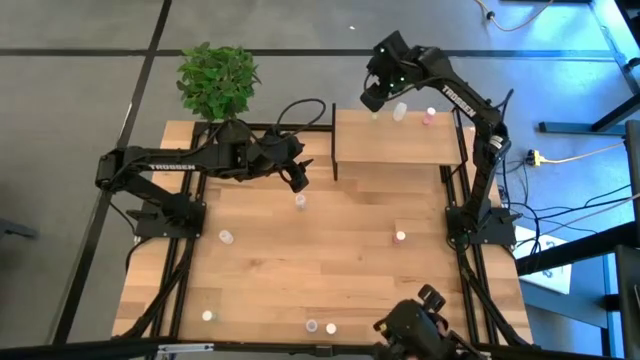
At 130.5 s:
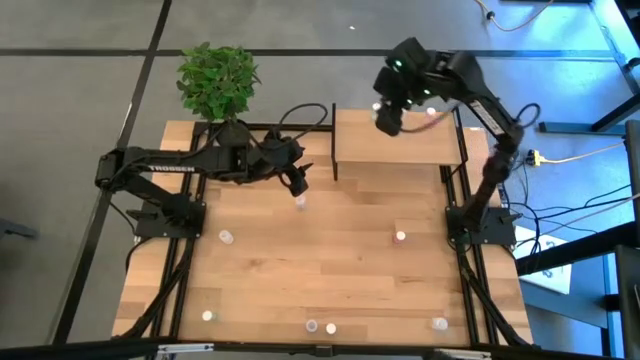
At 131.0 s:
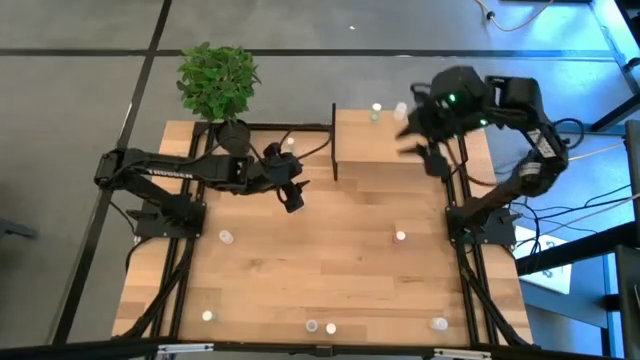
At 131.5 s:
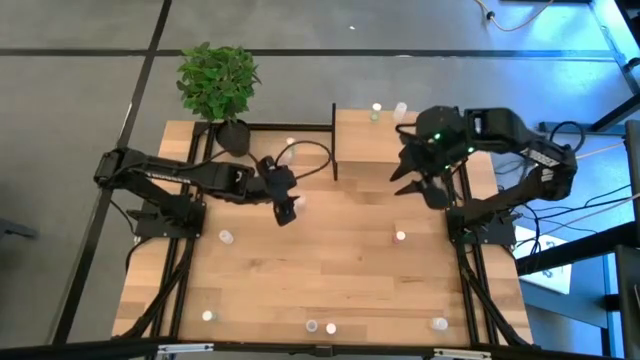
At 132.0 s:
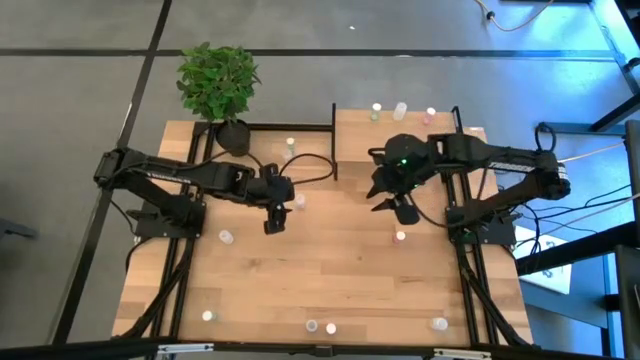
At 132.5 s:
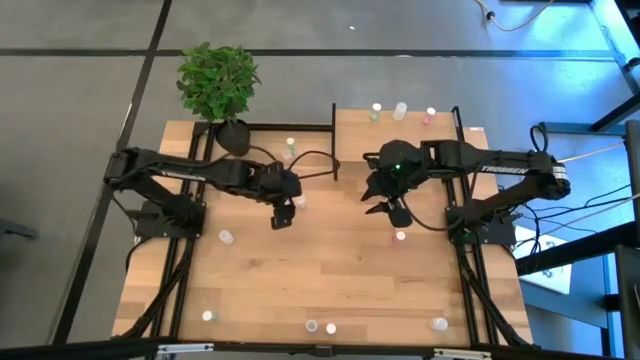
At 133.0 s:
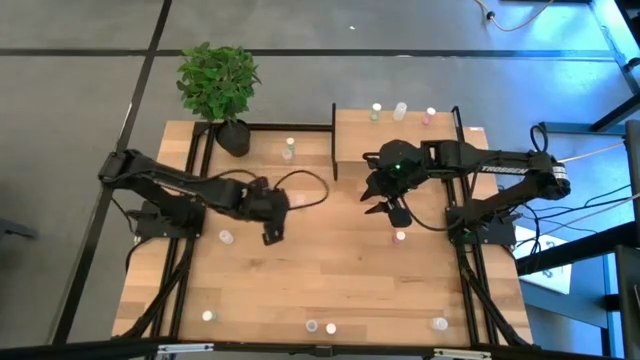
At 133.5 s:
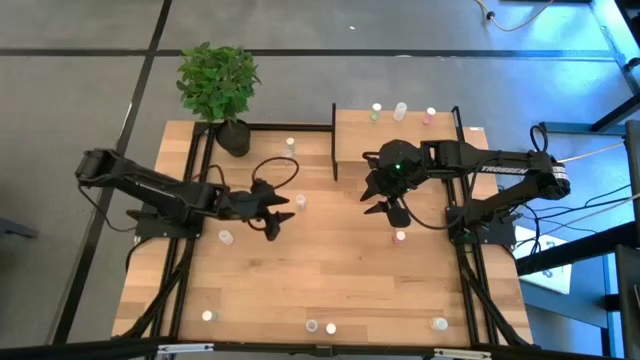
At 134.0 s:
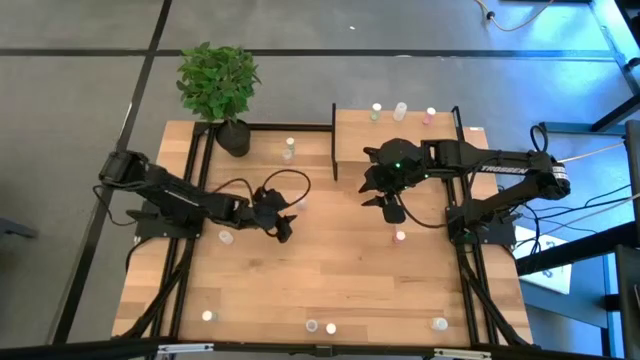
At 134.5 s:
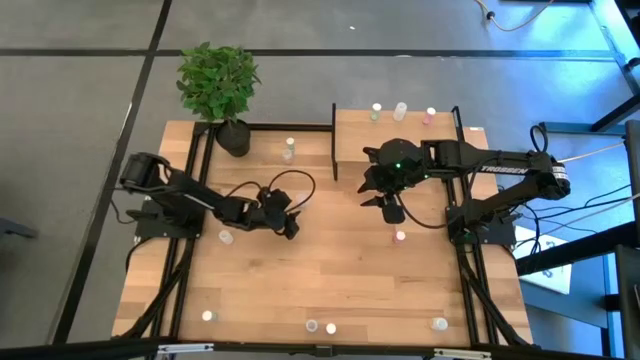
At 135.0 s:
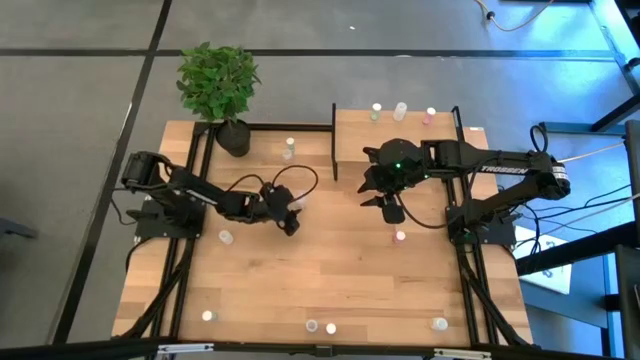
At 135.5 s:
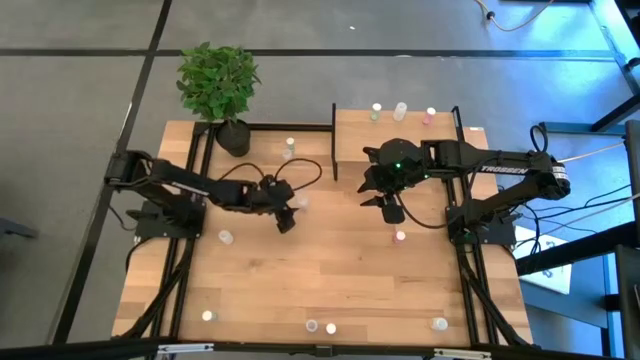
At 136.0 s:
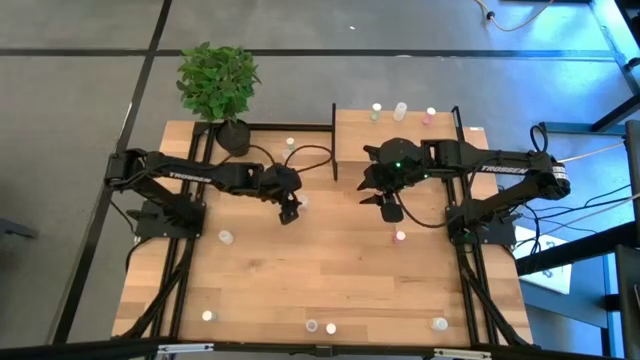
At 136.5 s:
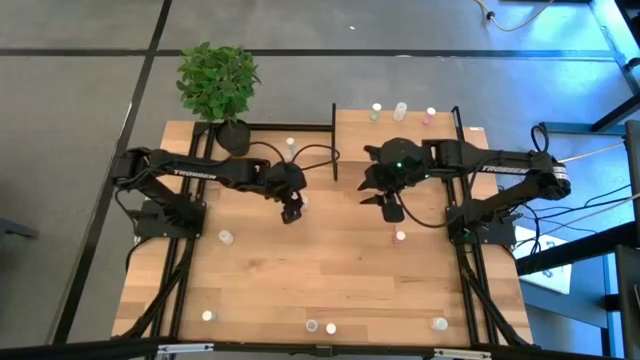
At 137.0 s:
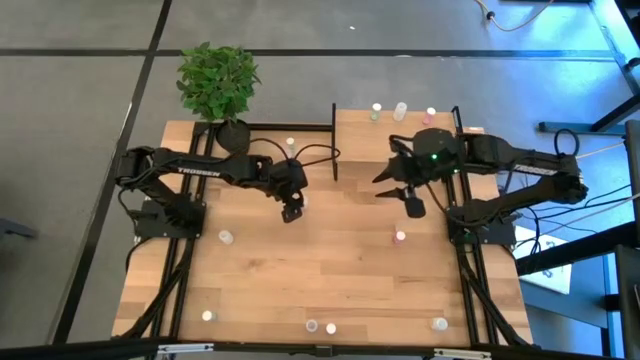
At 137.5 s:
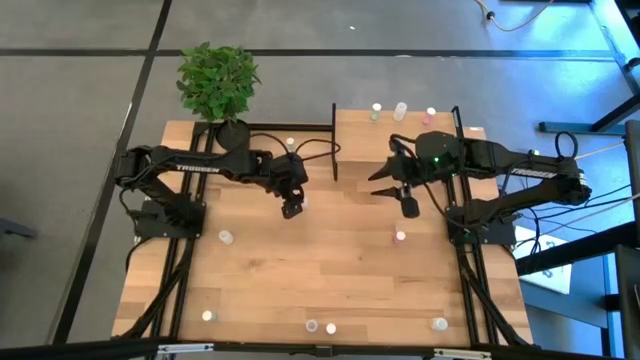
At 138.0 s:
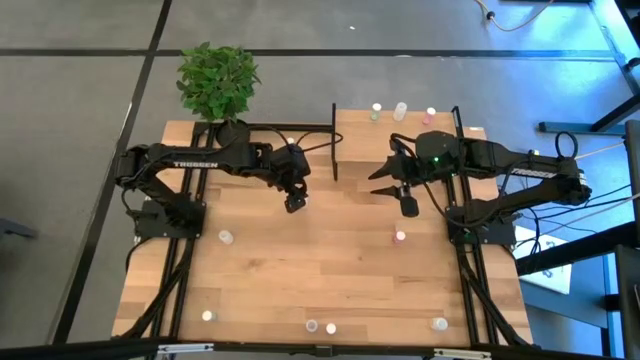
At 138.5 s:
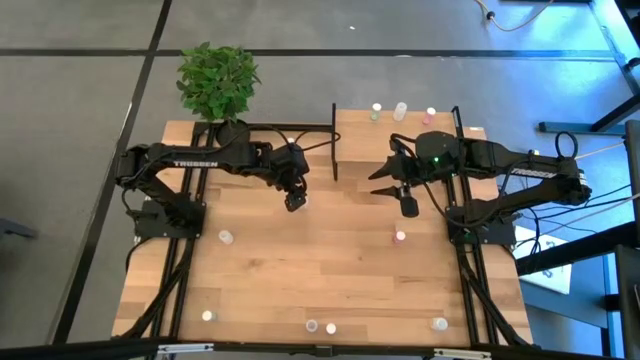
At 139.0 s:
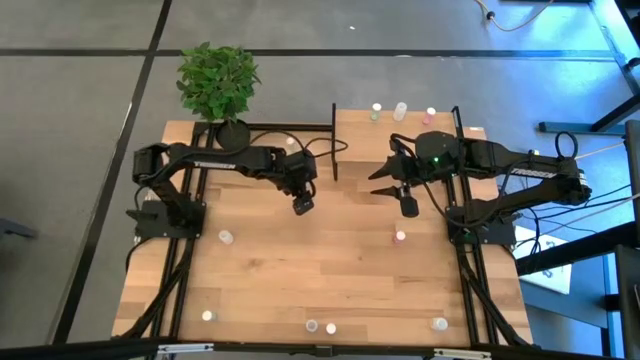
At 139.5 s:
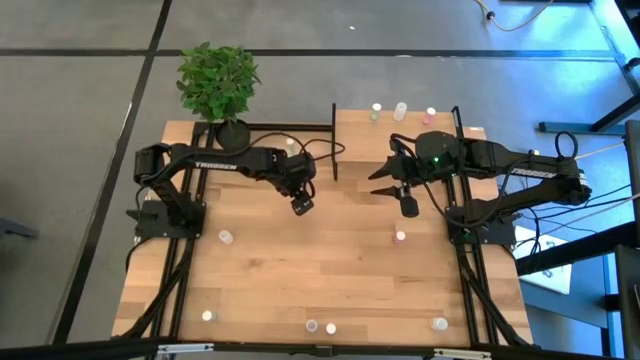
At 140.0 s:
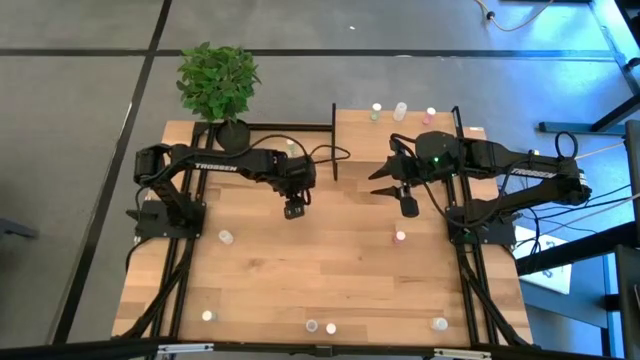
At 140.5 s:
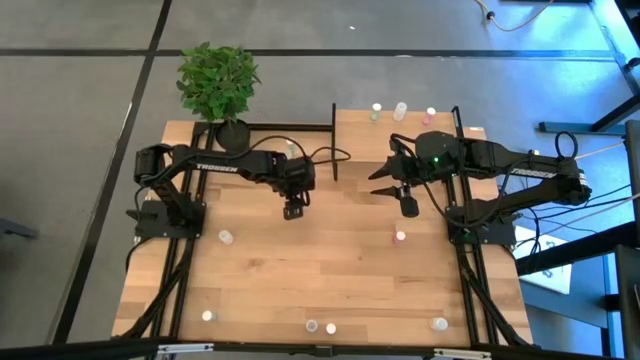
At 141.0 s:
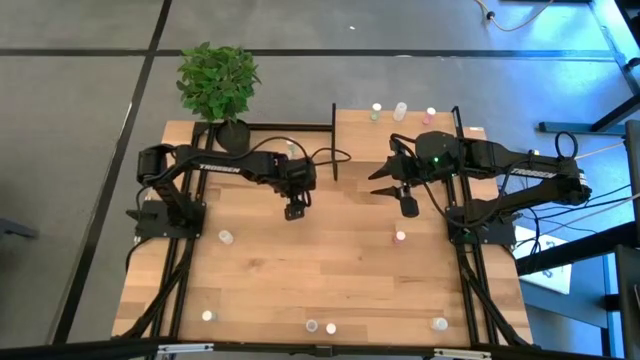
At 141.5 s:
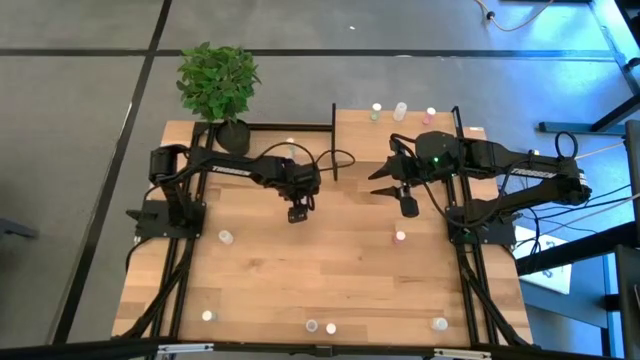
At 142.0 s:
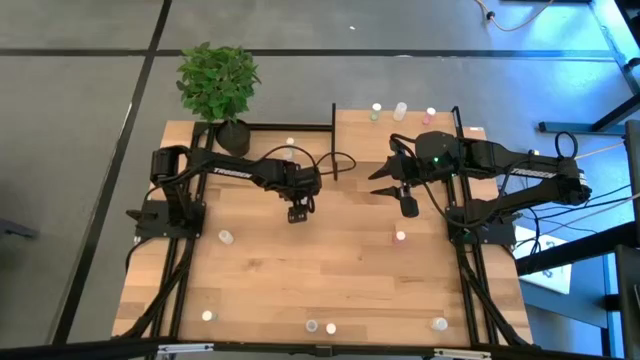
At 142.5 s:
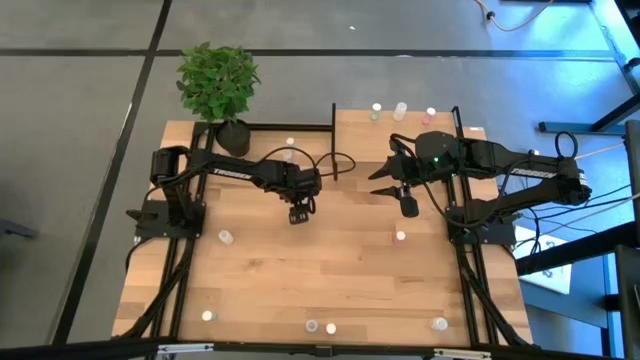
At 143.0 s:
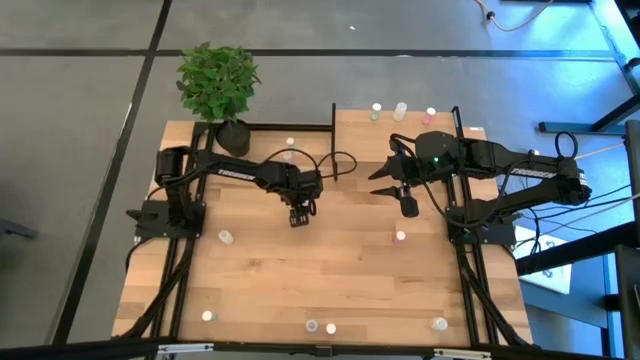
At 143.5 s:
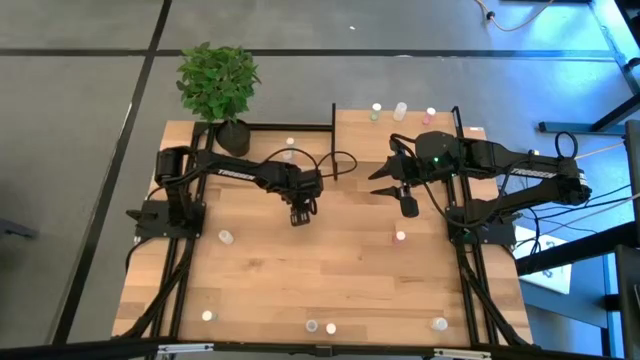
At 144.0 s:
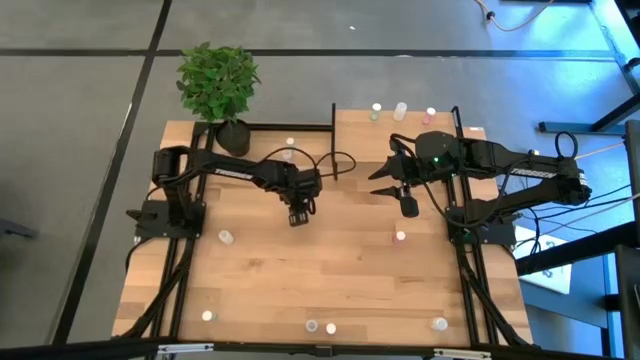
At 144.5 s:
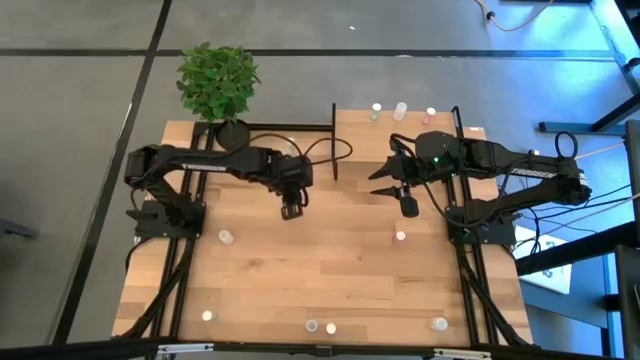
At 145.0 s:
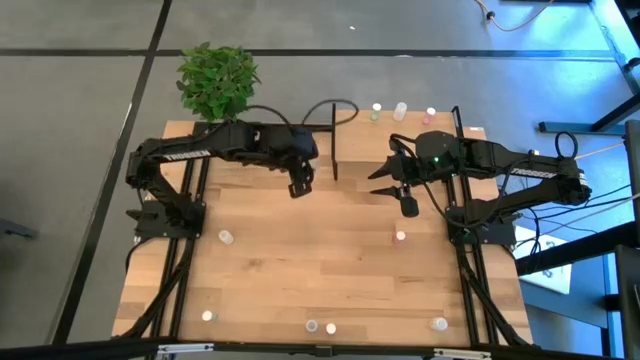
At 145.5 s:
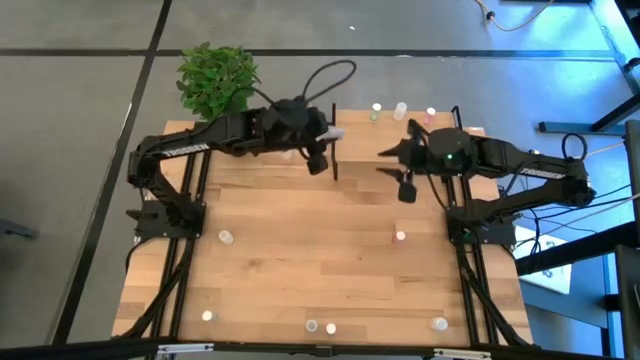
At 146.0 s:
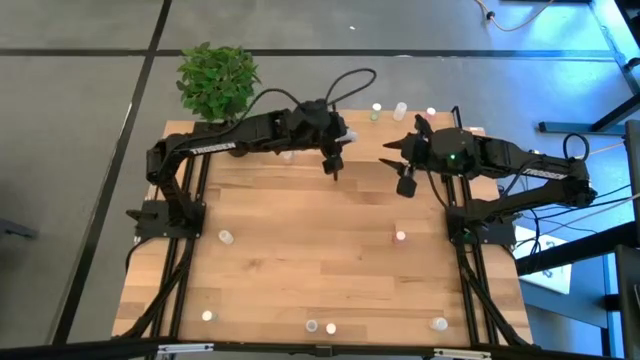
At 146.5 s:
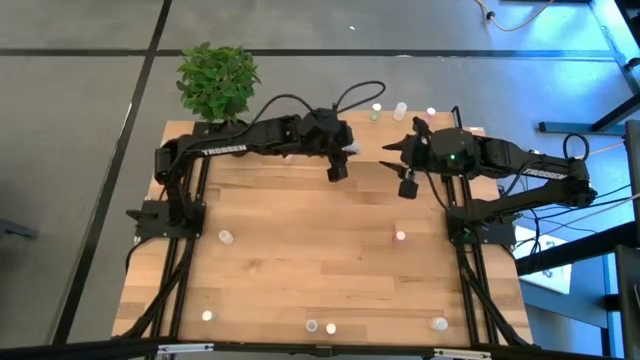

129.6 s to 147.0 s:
Task: Pick and place medicine bottles onto shelf by color
Put the middle transparent pill bottle on the shelf
